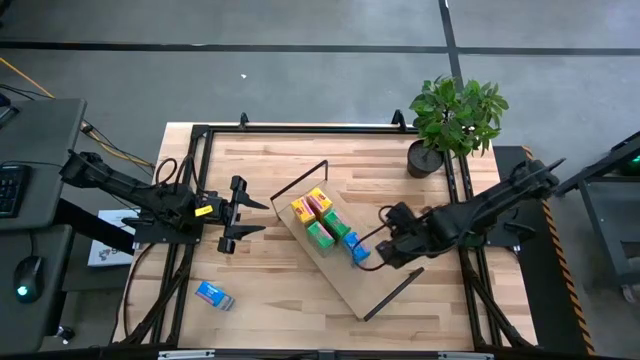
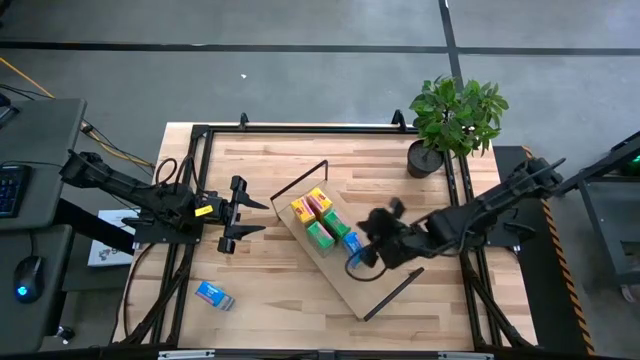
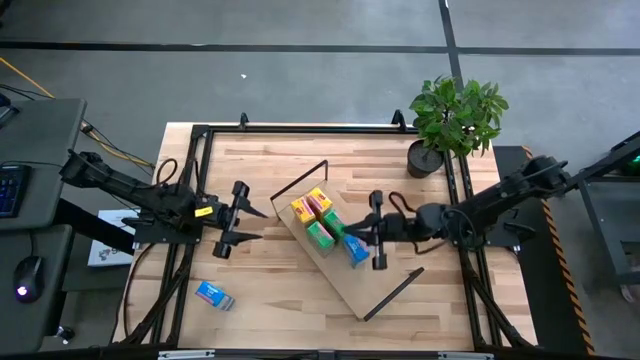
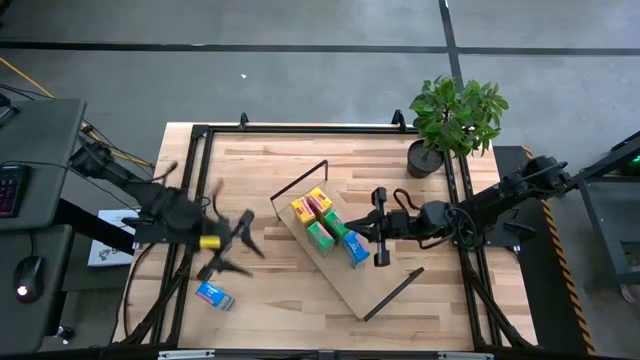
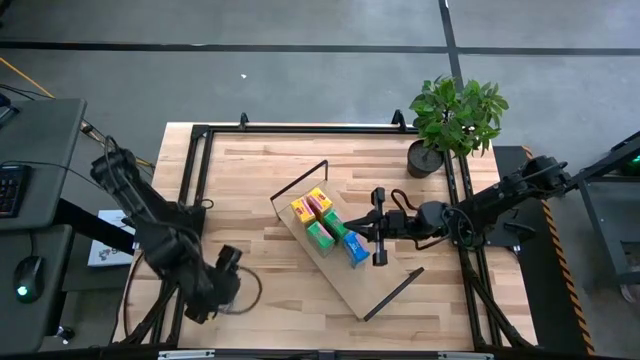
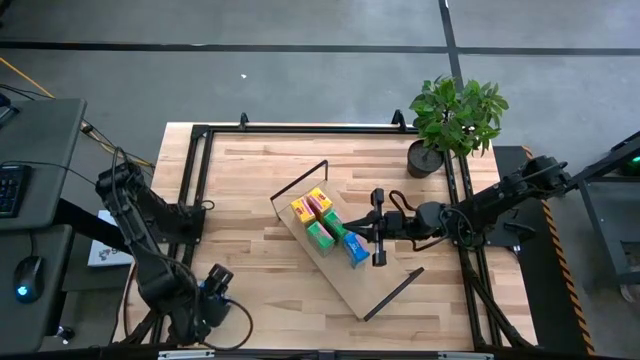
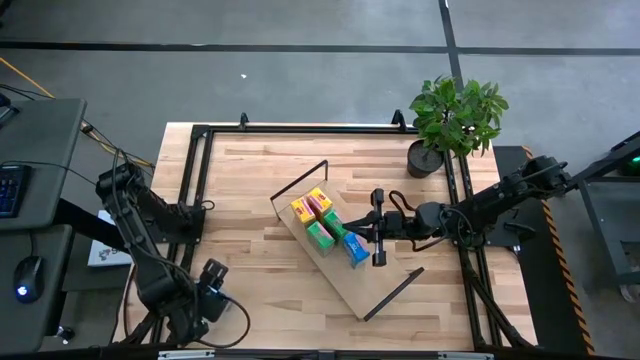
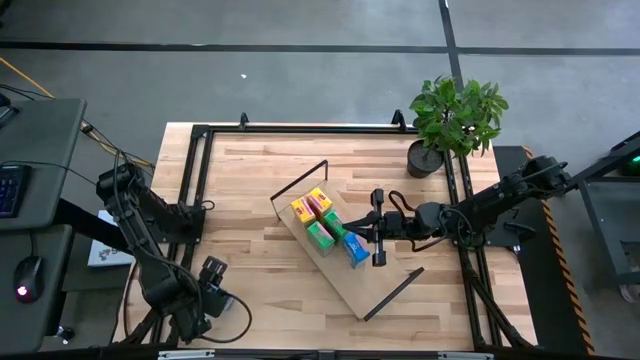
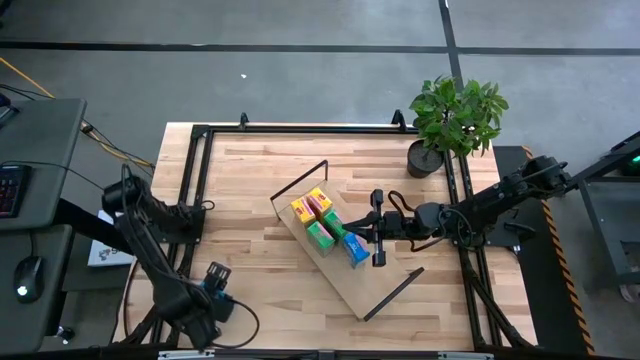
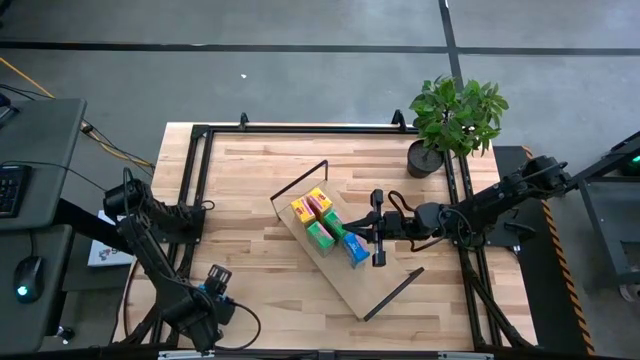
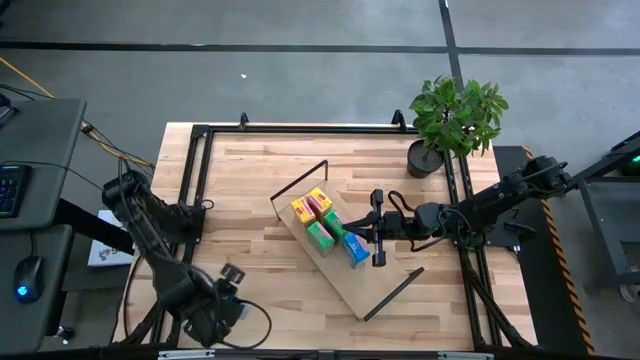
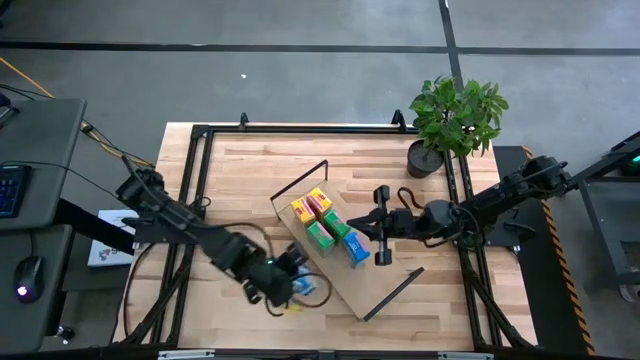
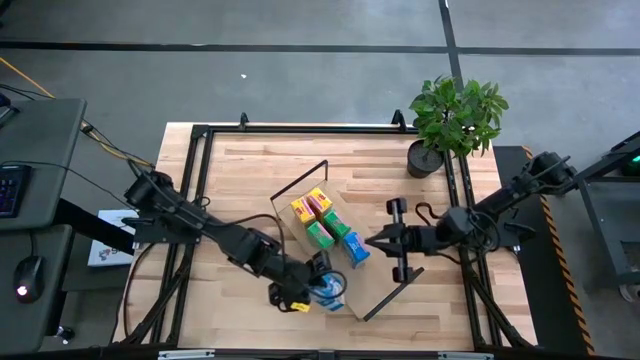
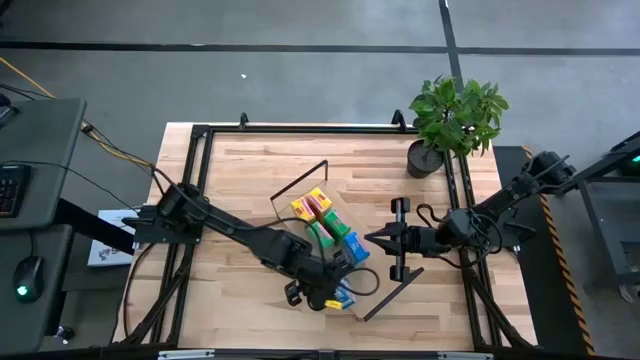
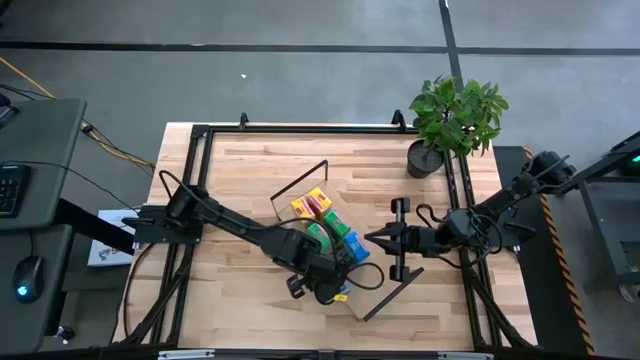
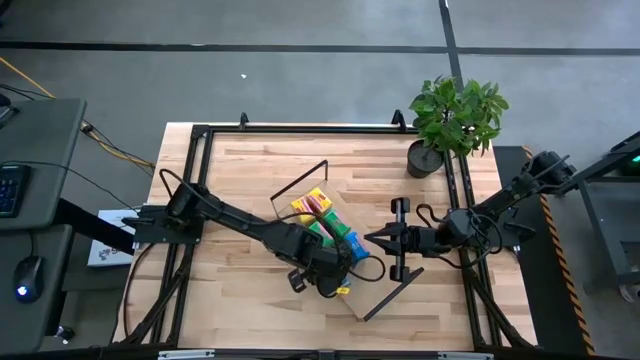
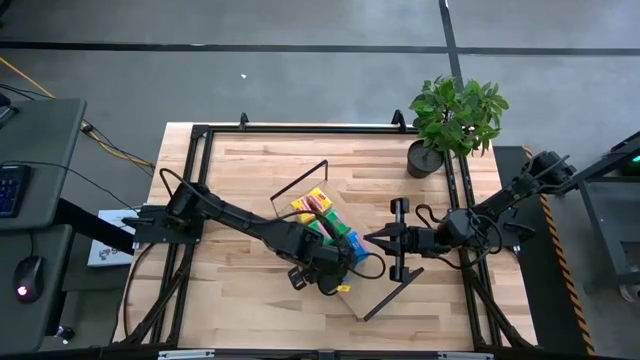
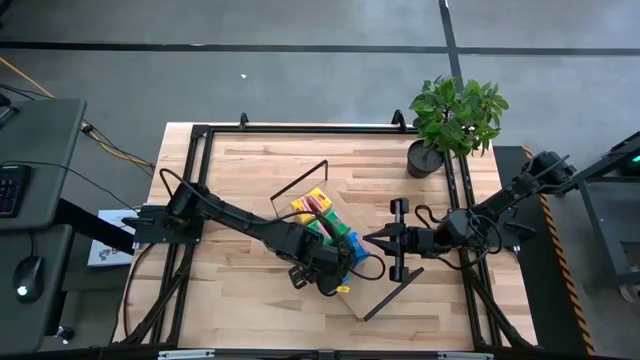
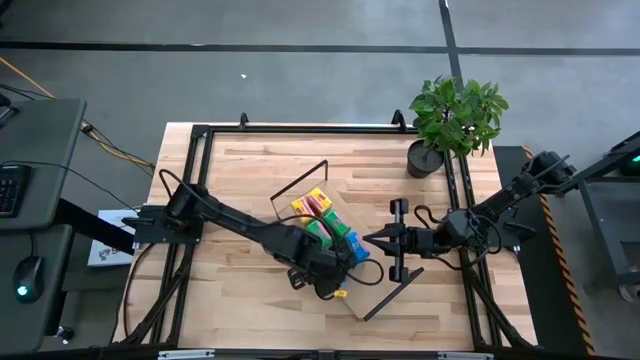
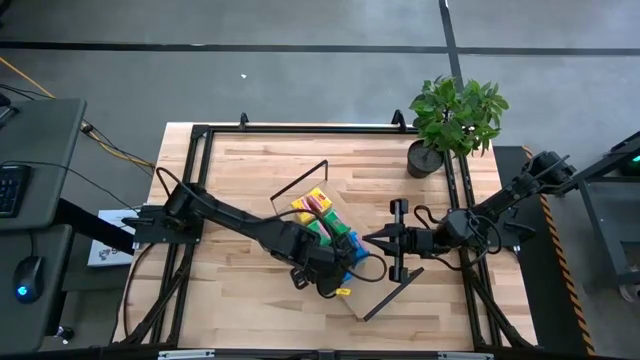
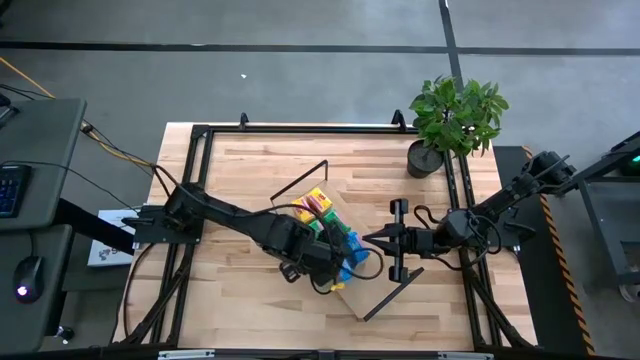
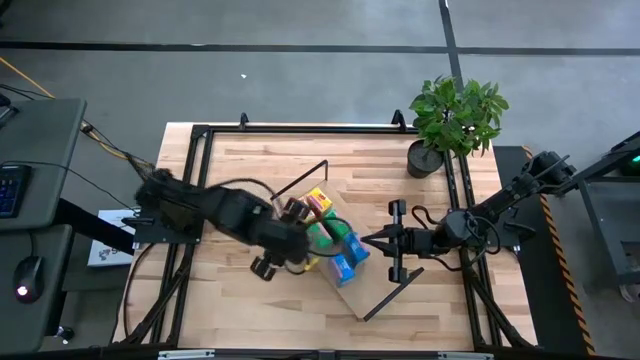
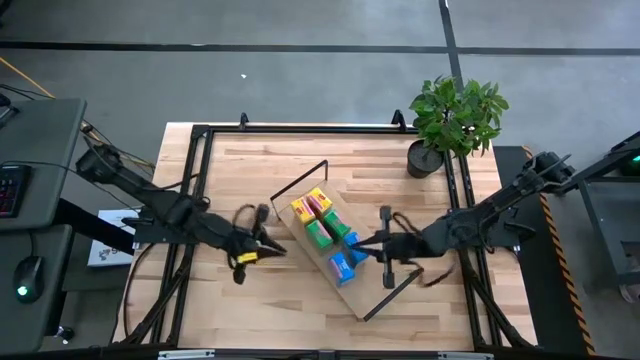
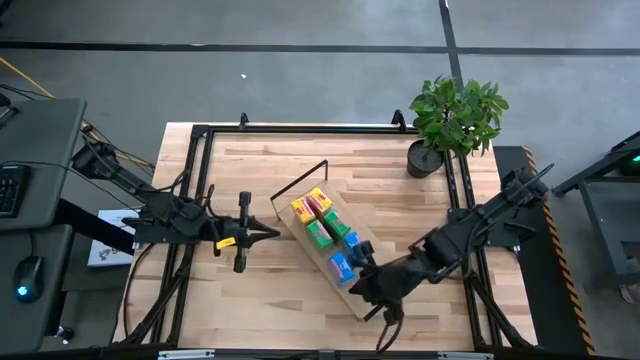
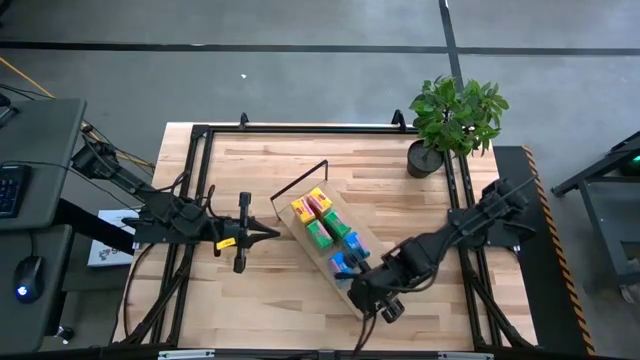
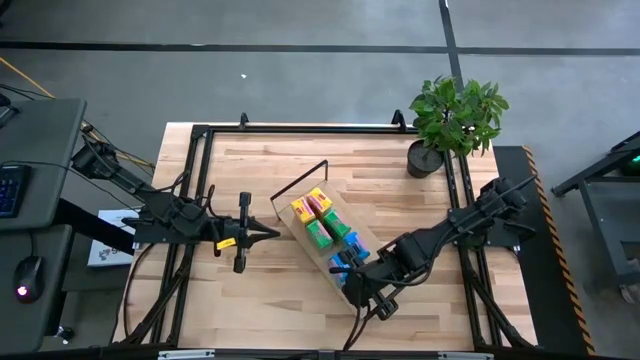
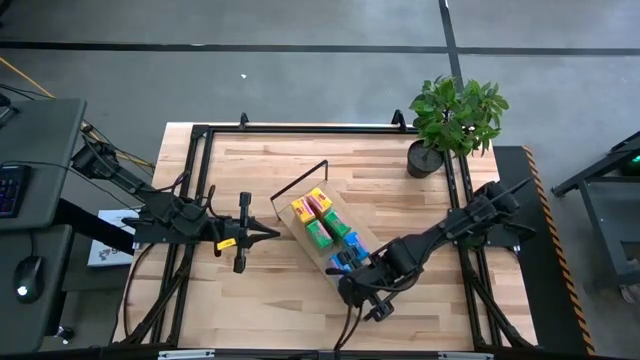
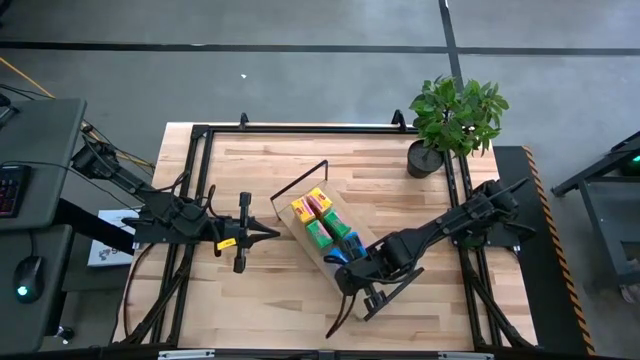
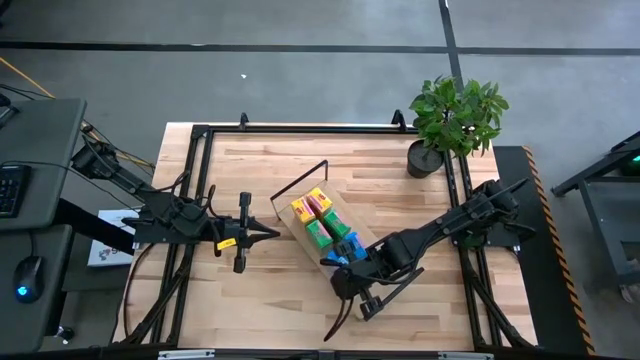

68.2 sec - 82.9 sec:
Task: Stack cereal on shelf
Put the blue cereal box aligned with the other blue cereal box on the shelf

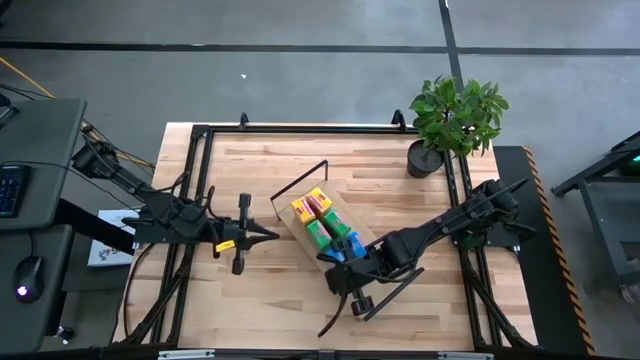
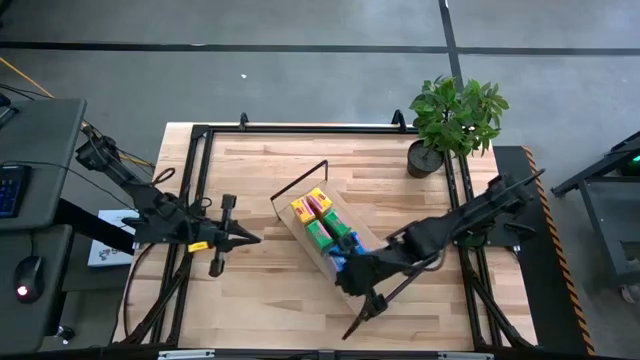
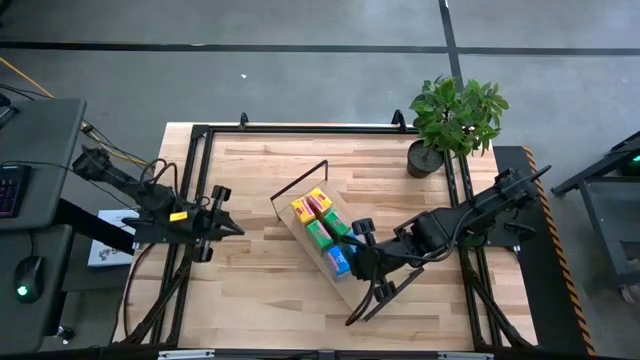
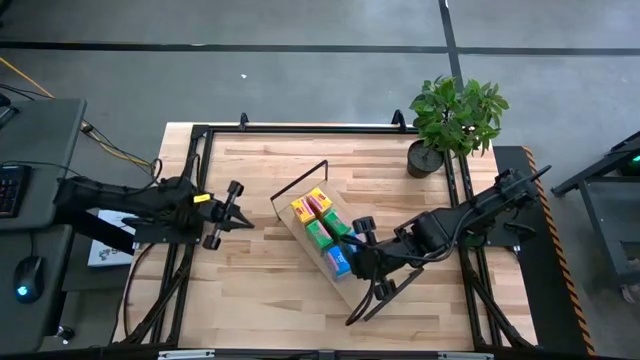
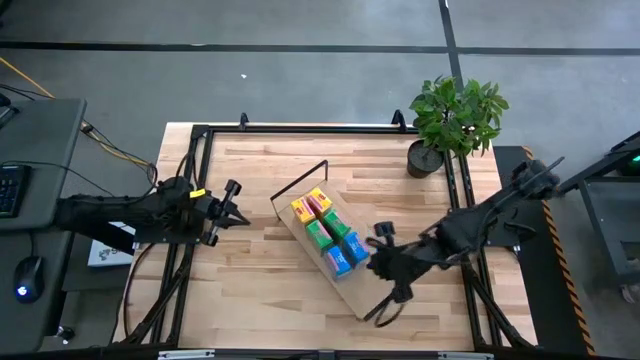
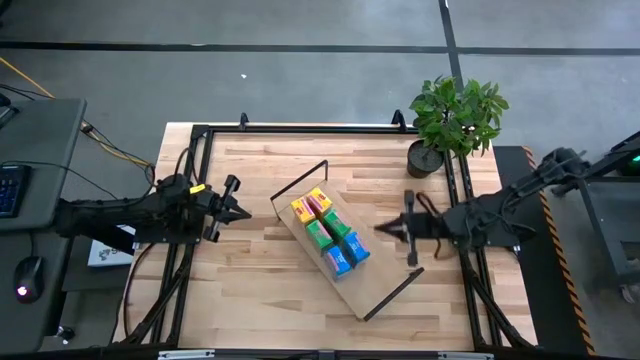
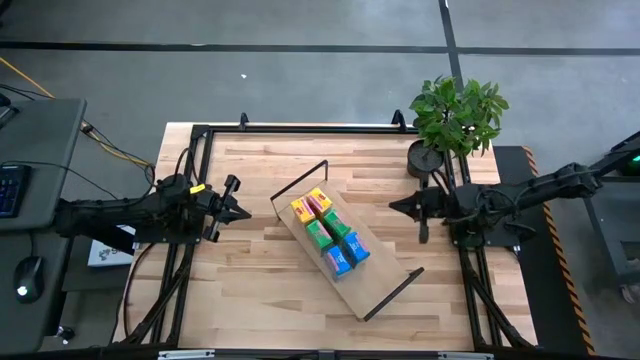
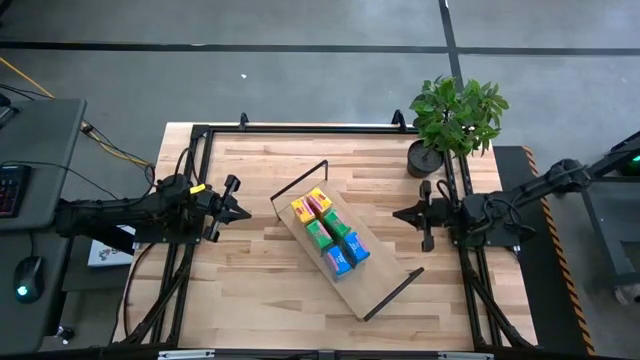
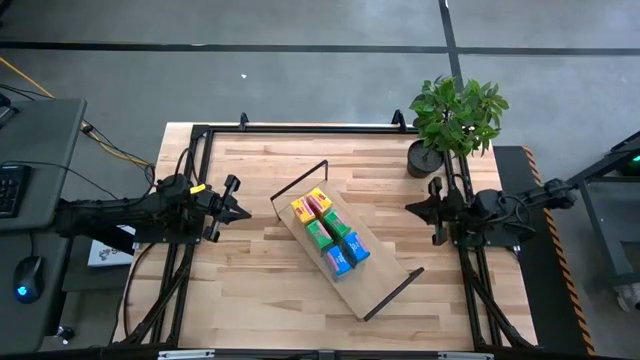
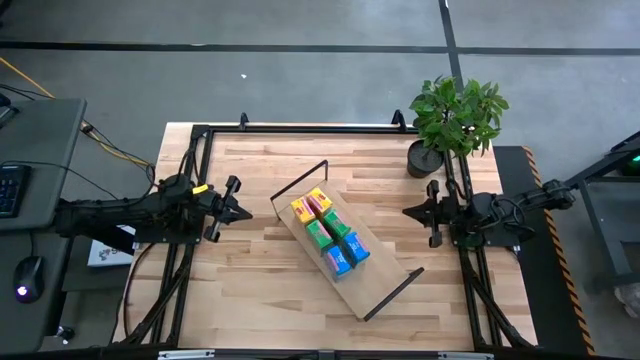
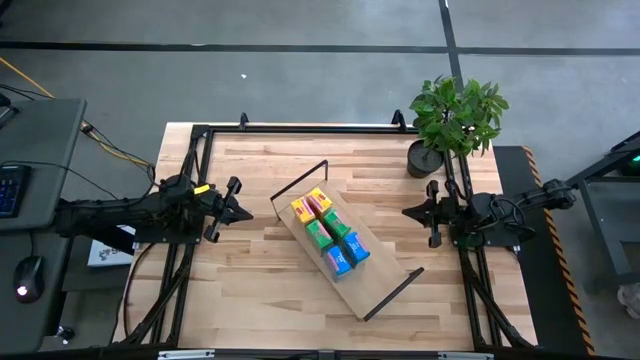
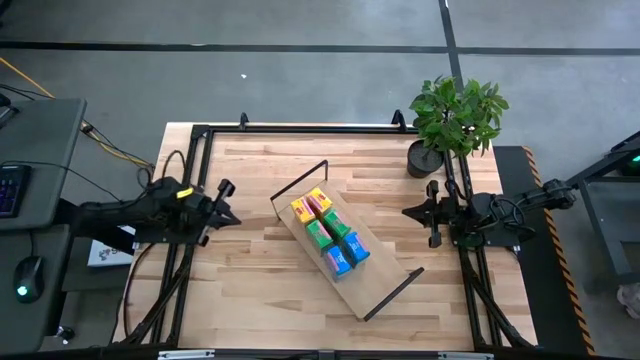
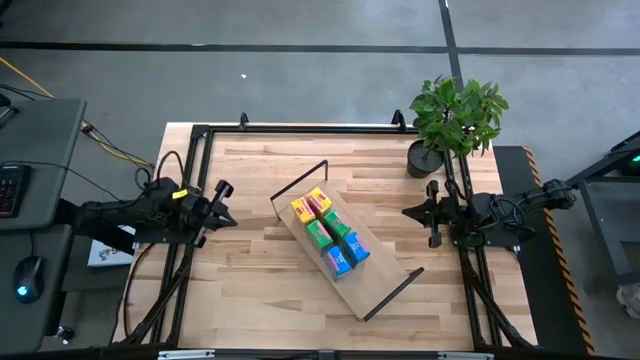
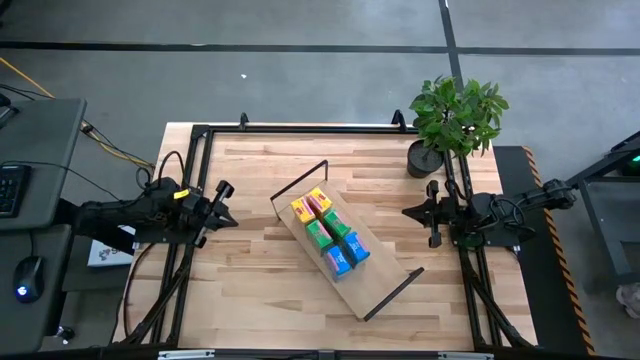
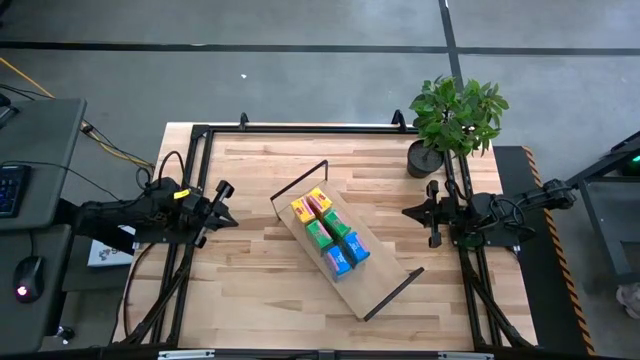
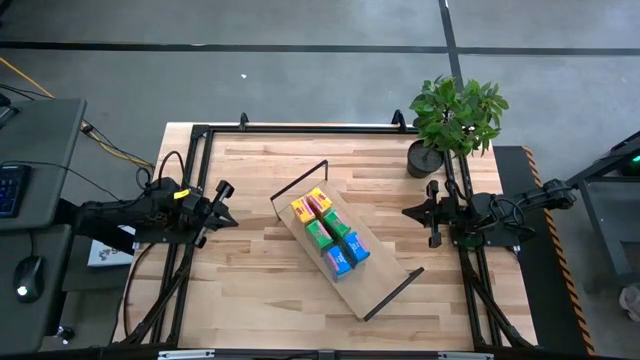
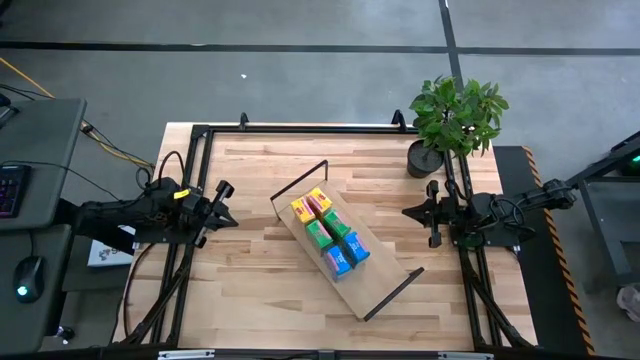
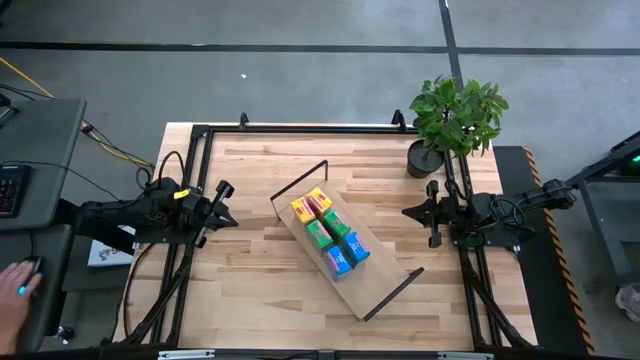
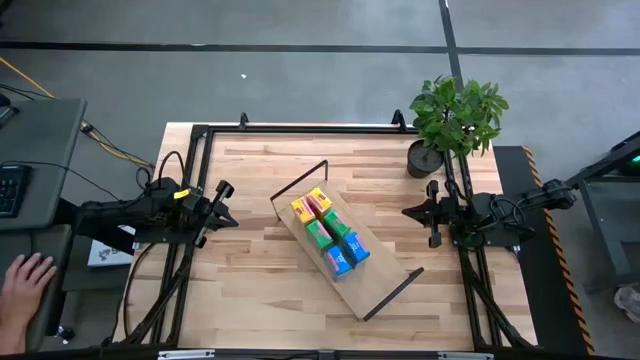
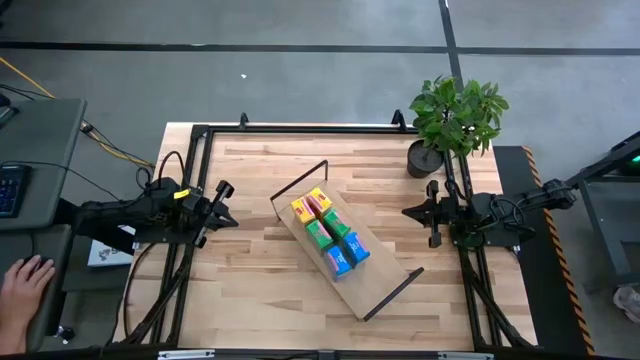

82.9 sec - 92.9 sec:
Return to Home Position
